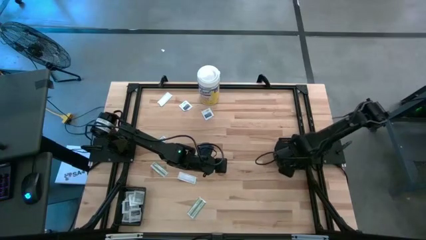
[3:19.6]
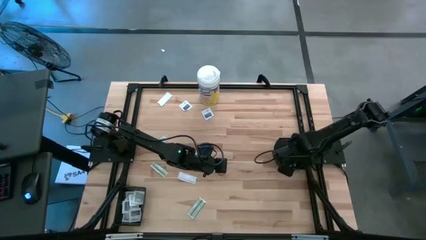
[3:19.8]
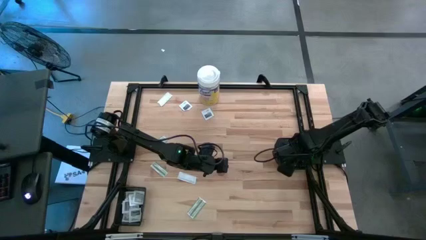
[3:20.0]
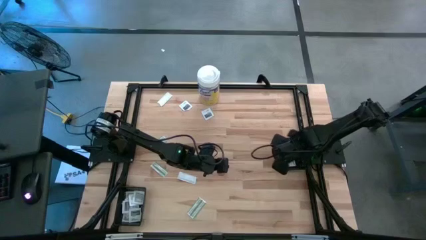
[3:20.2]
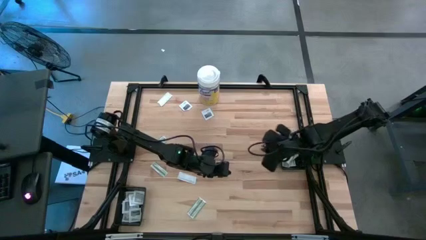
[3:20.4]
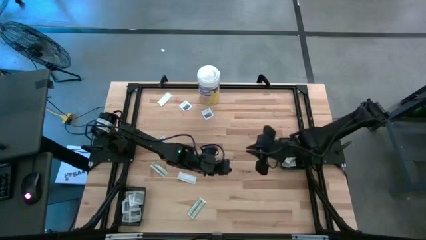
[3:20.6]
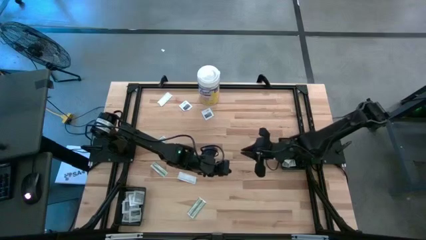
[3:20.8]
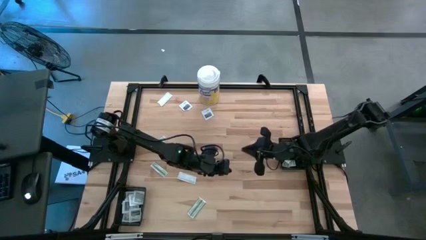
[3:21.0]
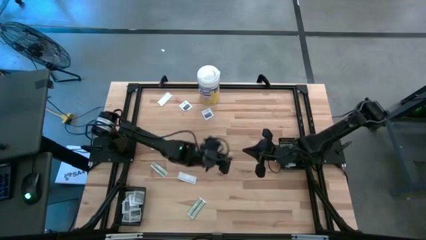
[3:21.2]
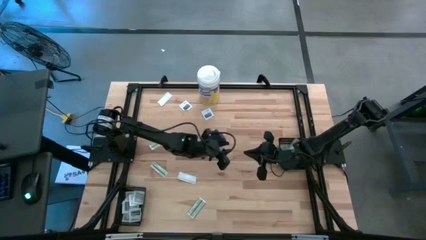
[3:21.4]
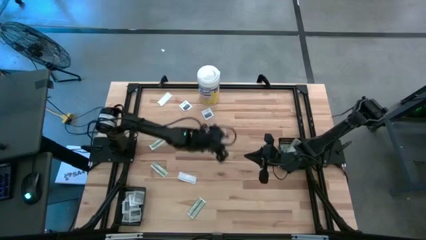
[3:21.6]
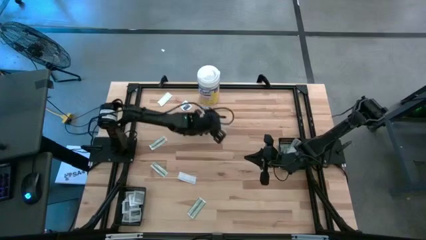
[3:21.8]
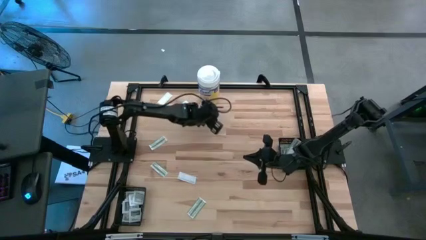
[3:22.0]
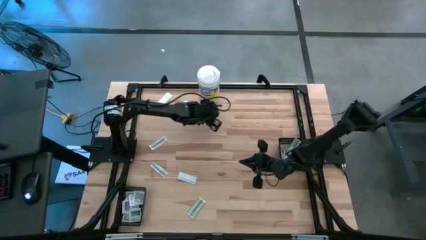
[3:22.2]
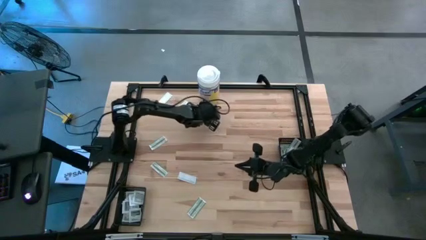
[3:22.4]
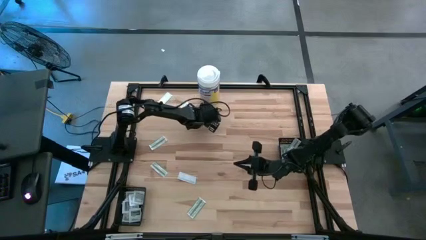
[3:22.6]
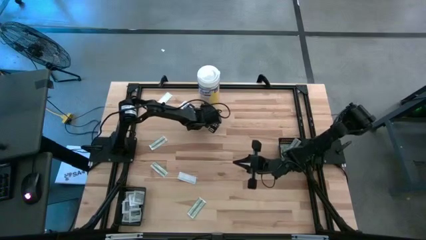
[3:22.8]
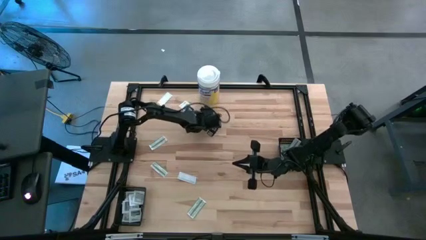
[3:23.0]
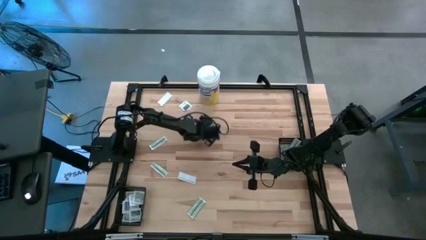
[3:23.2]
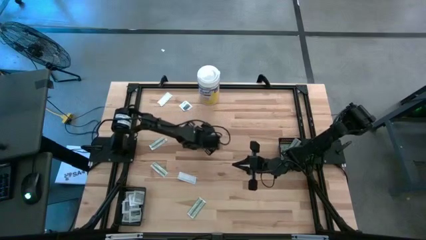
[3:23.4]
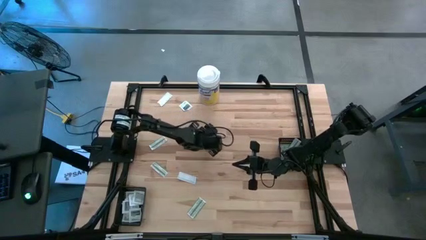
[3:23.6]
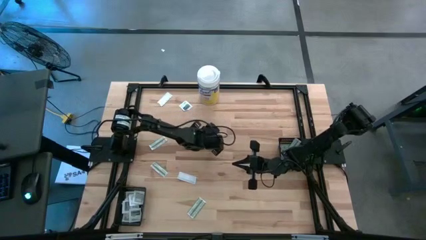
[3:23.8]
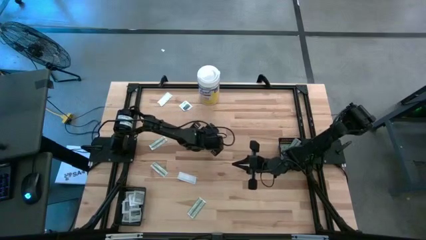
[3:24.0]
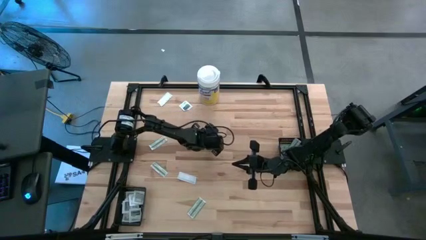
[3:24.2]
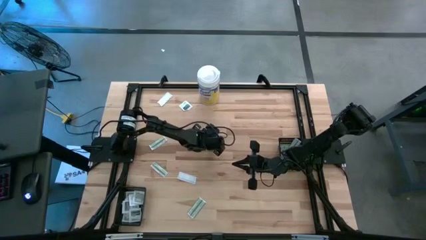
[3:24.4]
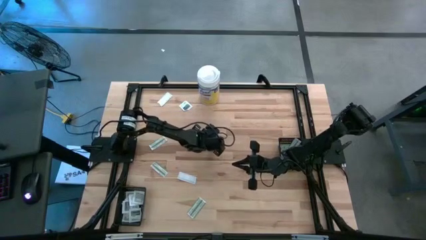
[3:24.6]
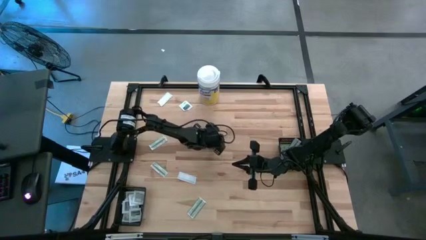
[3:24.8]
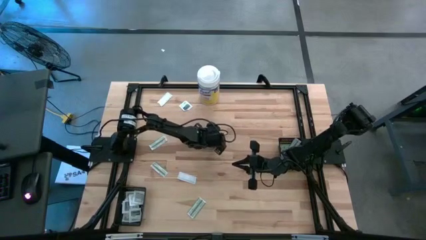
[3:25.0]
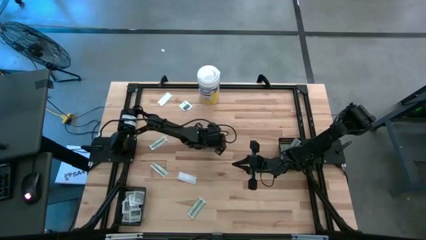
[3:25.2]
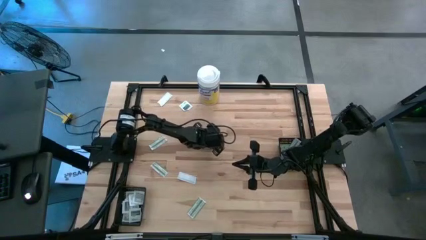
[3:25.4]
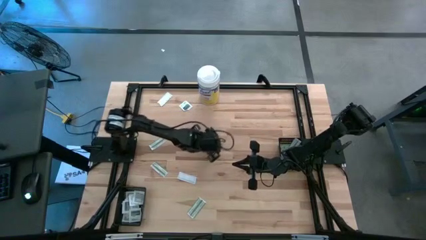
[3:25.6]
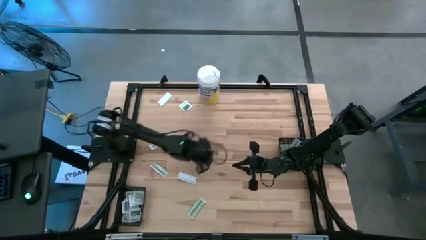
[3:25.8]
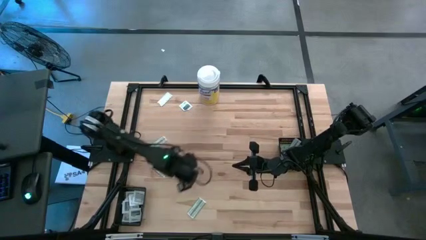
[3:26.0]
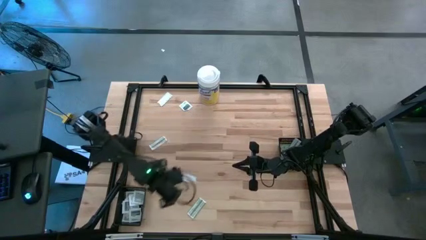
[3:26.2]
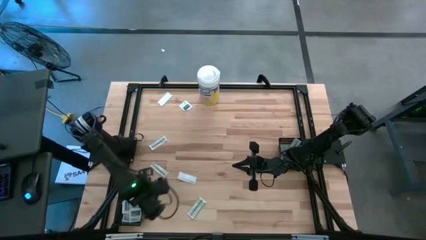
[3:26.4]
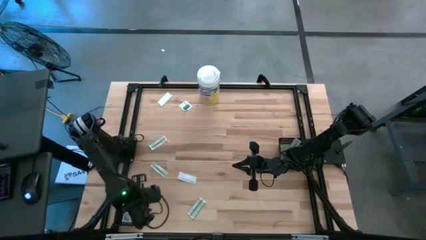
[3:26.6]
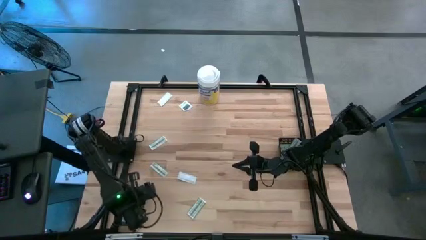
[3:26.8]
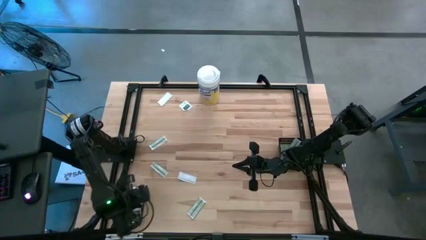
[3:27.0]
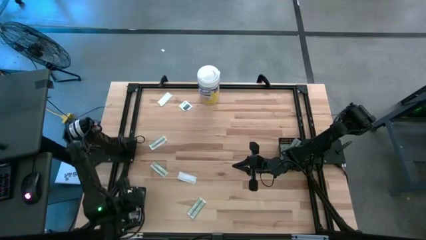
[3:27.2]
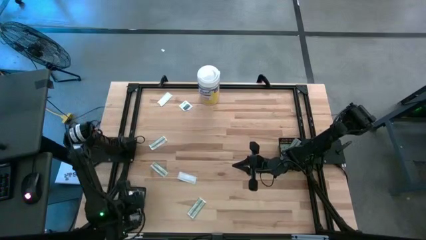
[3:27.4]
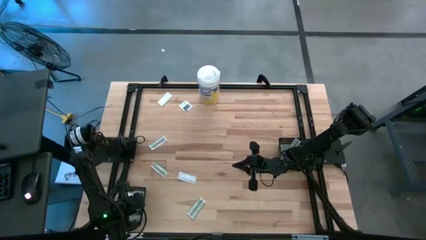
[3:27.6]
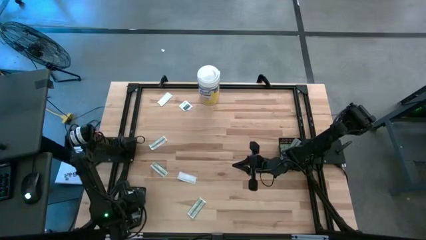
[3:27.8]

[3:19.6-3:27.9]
Task: Pick & Place First Aid Supplies
Put the white towelette sachet into the left black bin

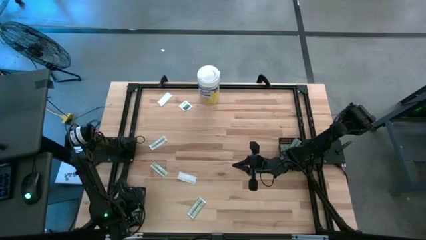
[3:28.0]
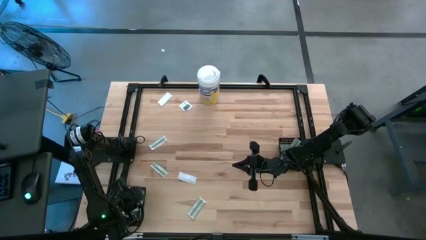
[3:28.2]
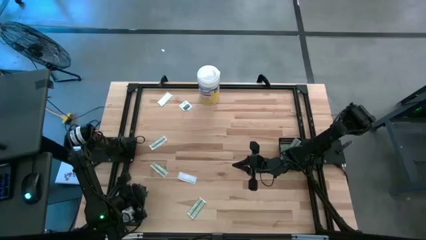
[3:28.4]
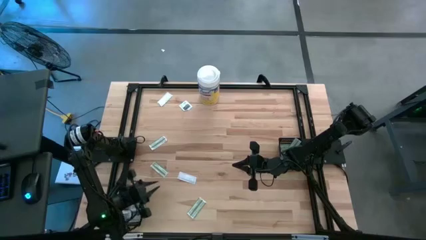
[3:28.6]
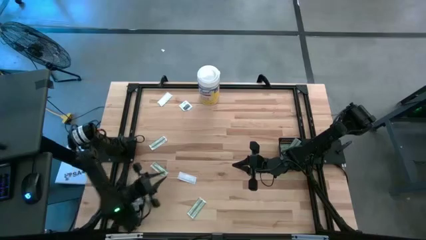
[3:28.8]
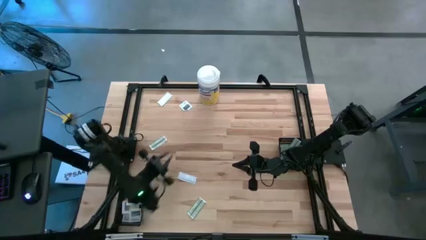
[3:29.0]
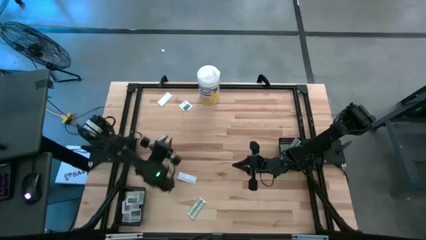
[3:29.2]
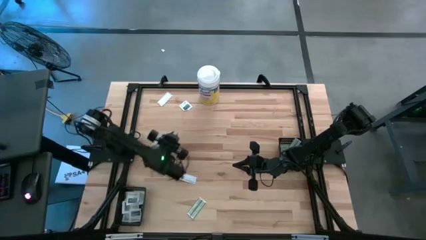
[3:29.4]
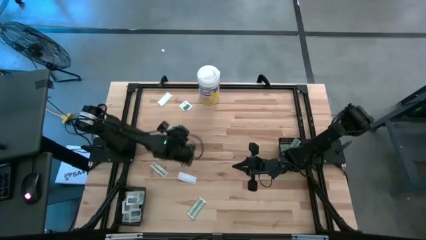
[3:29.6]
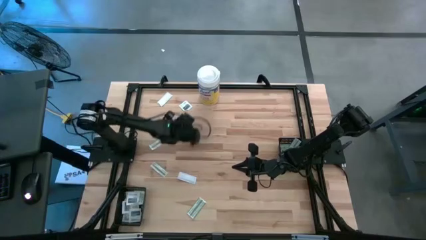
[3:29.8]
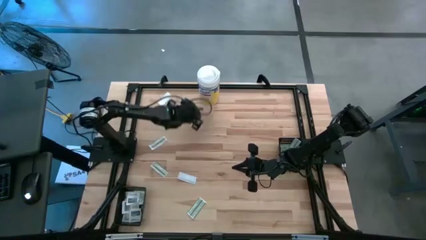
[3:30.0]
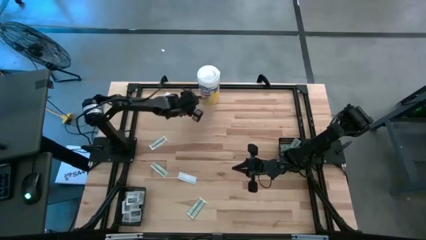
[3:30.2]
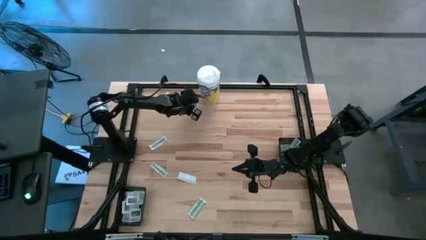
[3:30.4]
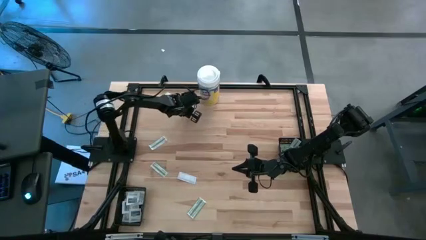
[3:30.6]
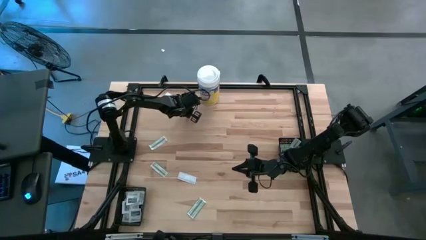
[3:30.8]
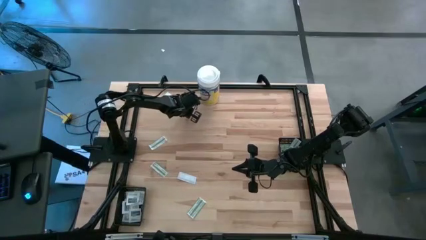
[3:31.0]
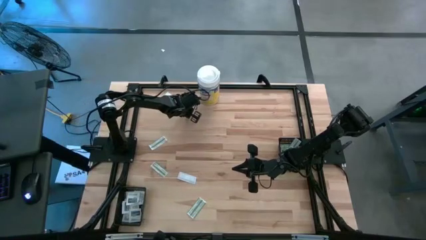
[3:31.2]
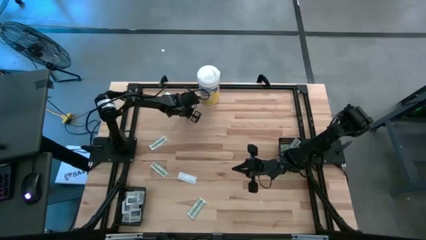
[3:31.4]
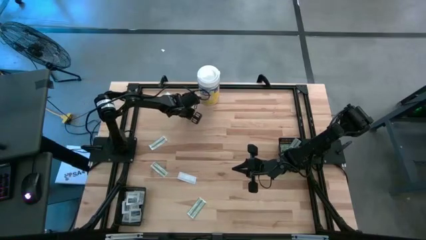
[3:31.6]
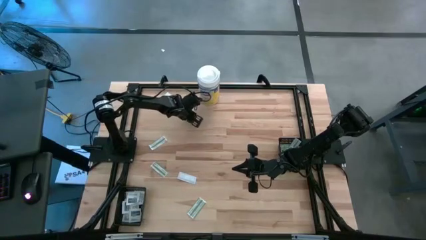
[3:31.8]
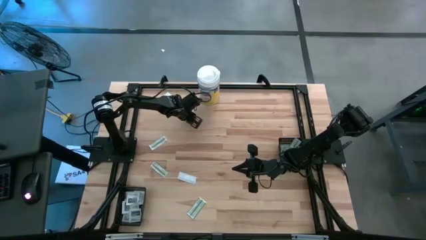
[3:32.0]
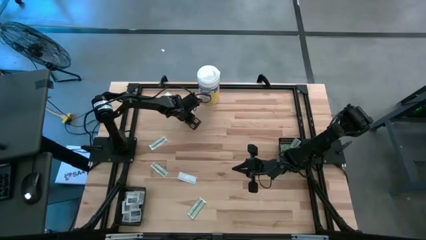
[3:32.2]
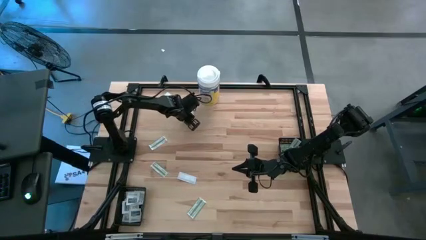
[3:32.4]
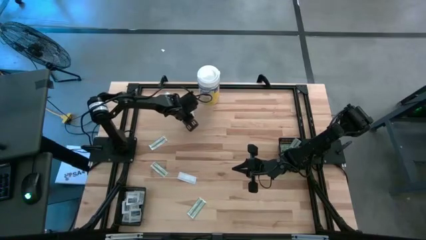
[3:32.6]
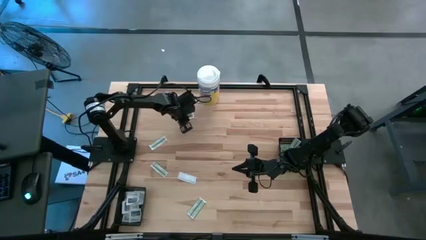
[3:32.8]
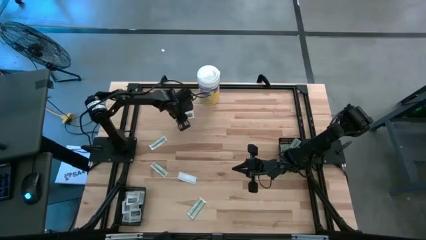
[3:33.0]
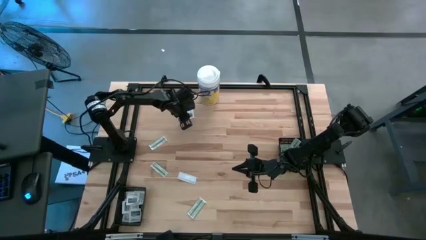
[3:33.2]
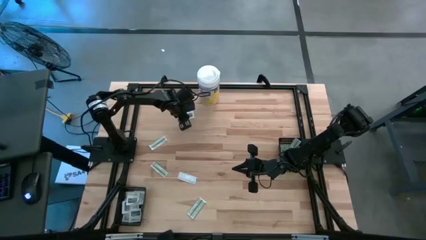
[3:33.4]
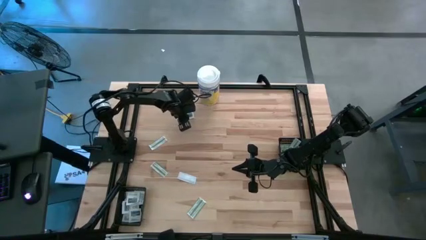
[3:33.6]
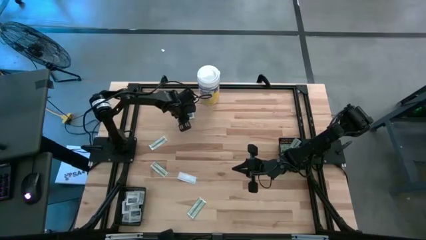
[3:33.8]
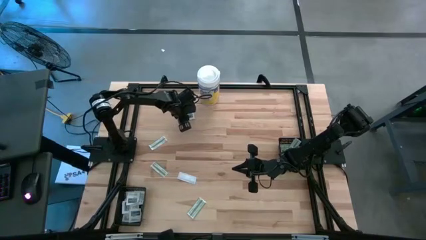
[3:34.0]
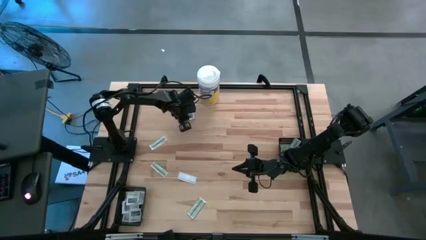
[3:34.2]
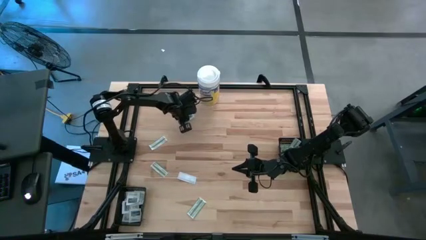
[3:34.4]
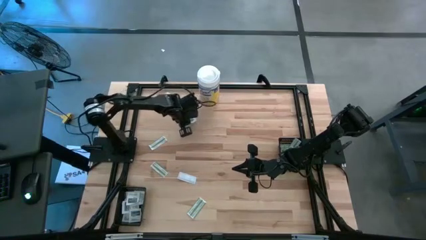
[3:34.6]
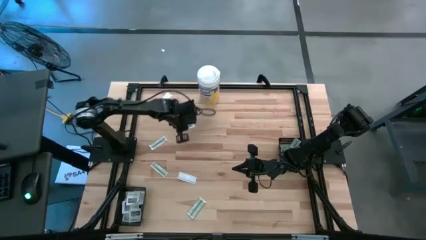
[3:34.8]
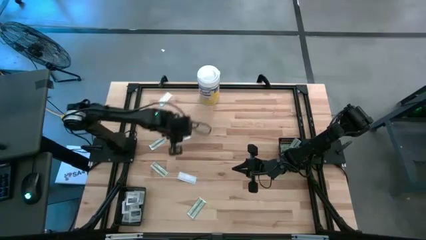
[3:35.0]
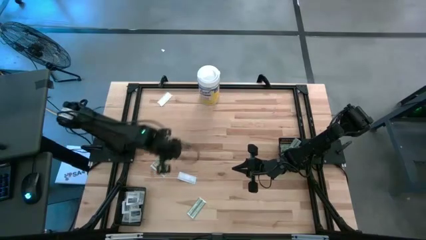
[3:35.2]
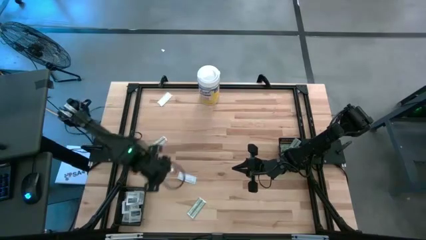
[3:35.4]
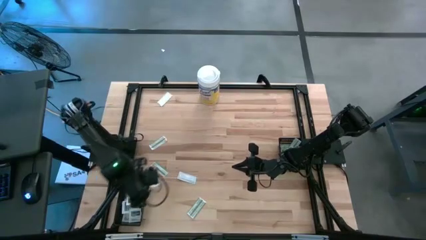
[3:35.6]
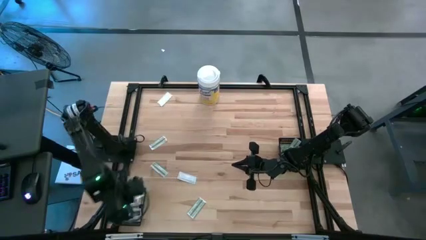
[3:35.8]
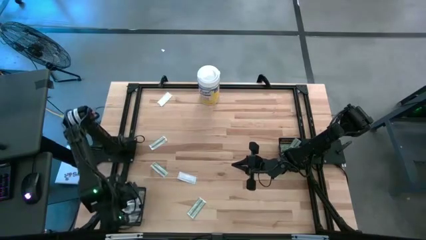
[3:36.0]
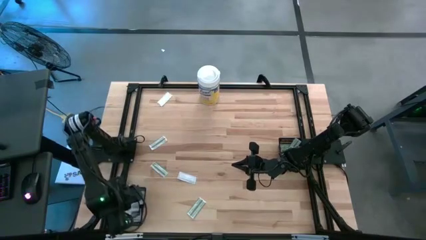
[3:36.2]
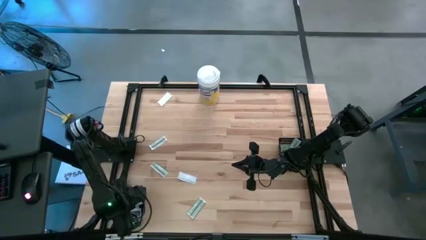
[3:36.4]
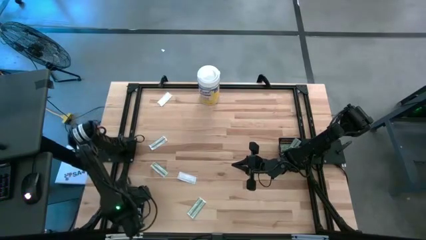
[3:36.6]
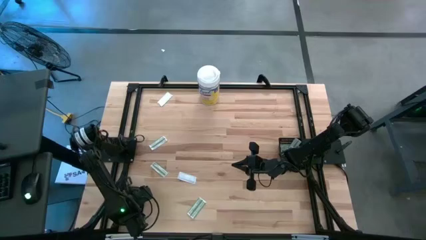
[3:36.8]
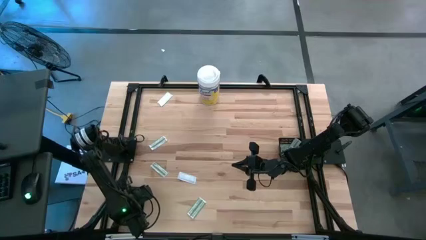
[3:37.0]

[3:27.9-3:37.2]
Put the white towelette sachet into the left black bin
